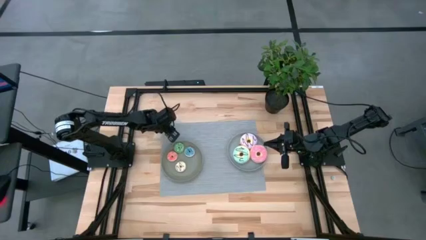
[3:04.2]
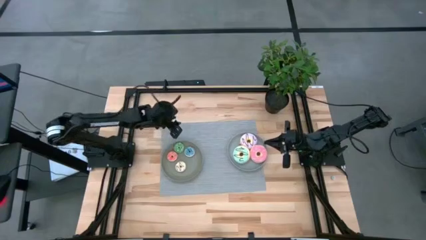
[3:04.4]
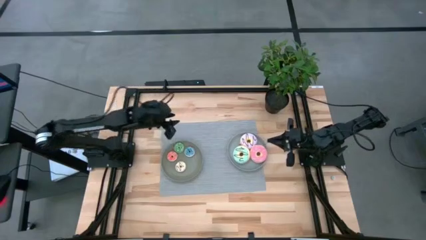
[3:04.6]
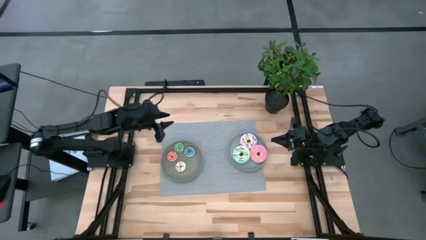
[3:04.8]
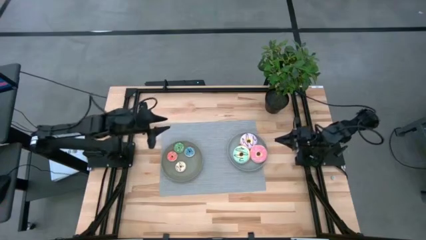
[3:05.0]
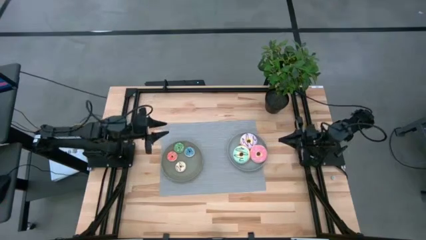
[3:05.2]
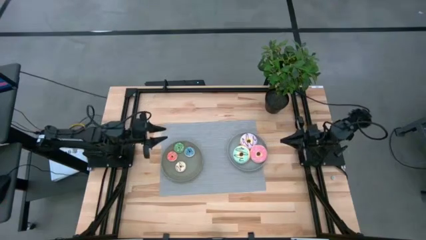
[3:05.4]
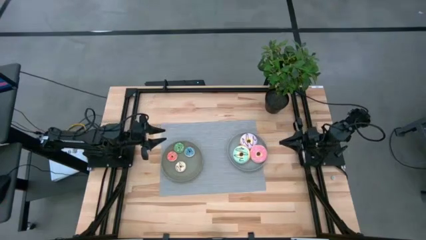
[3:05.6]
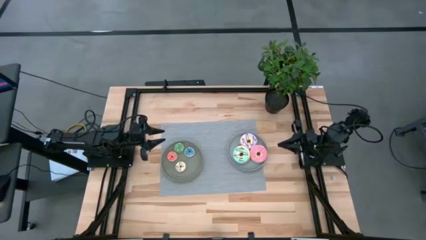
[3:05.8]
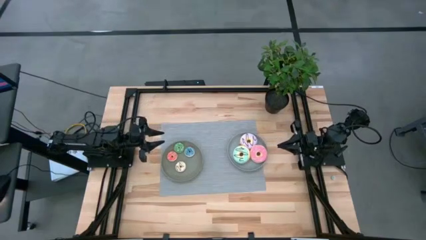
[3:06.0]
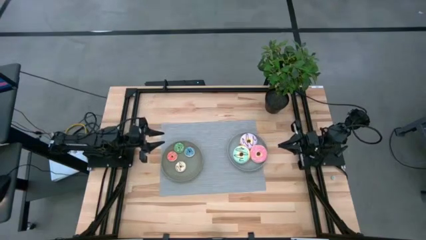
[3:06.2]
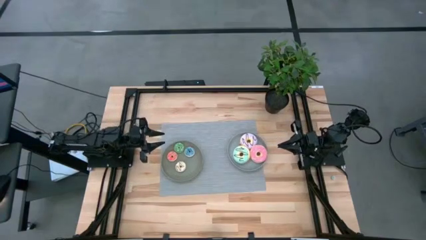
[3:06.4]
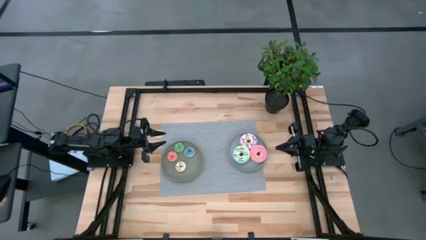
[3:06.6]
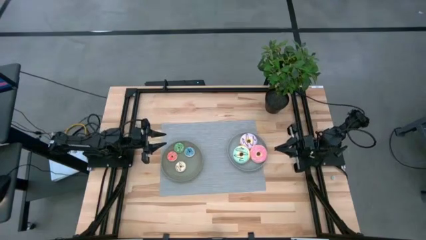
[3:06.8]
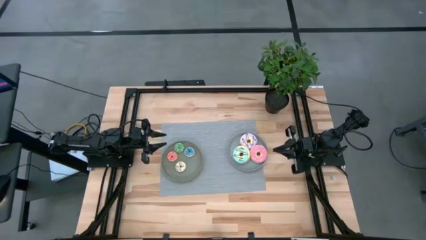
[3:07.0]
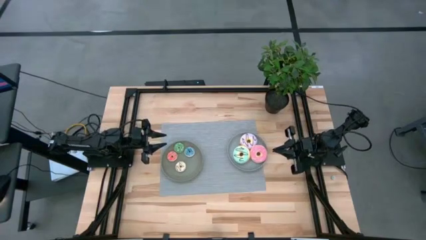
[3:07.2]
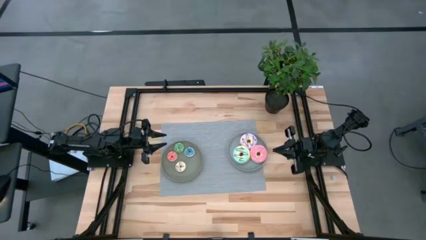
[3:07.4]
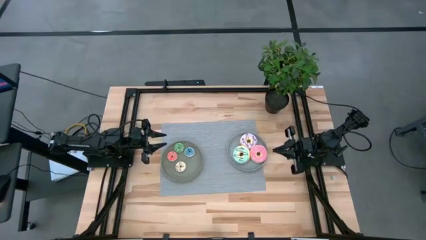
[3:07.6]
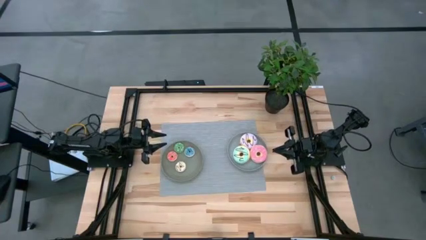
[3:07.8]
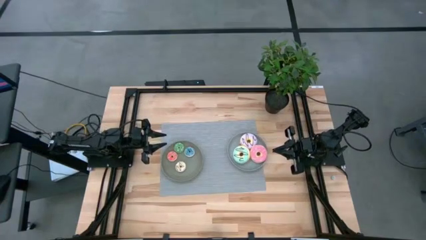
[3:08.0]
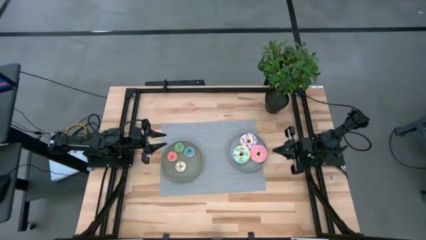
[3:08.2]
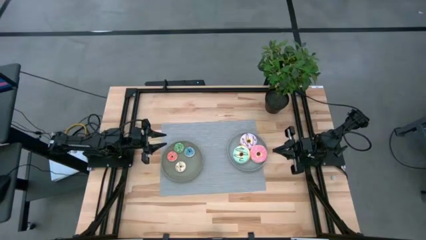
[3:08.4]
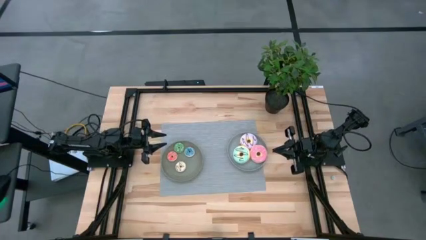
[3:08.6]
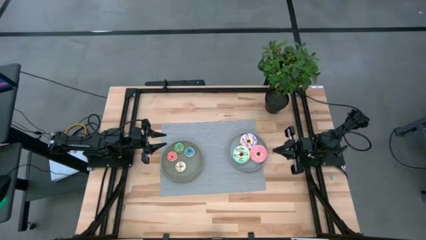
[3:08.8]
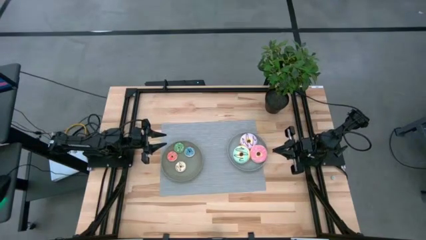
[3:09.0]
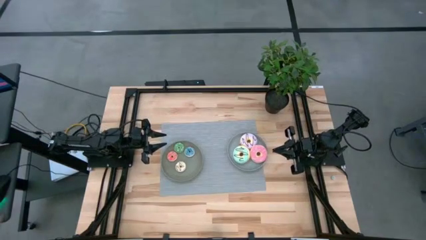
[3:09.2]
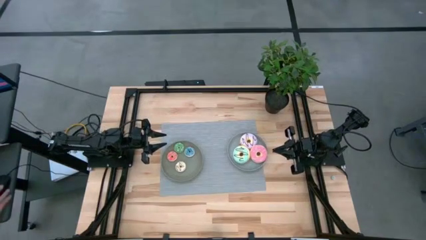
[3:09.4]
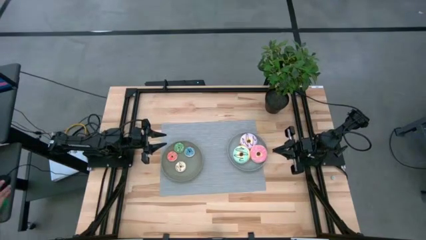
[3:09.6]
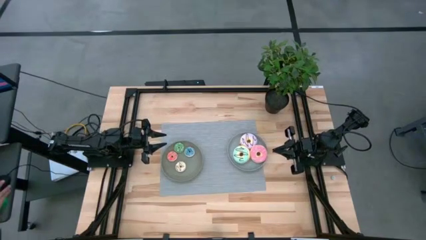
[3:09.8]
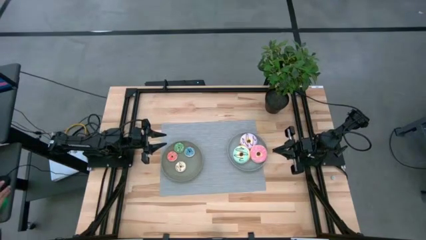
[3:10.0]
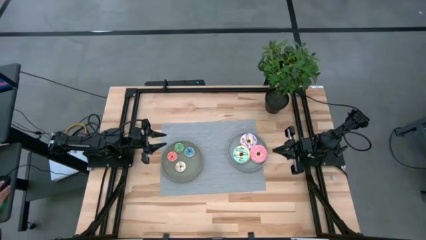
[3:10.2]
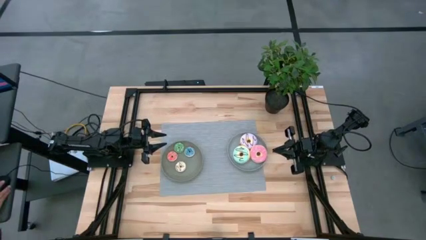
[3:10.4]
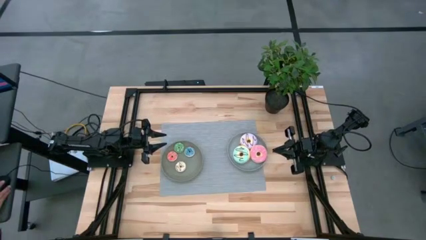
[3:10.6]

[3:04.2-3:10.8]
Task: Pick & Place donuts
Return to Home Position

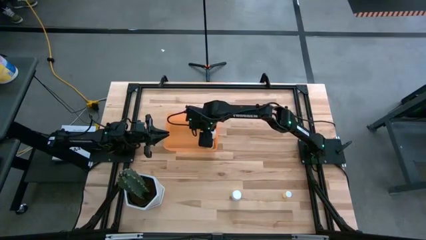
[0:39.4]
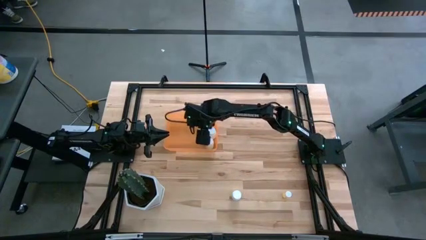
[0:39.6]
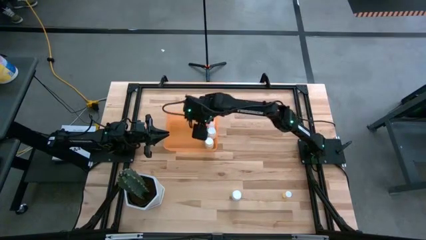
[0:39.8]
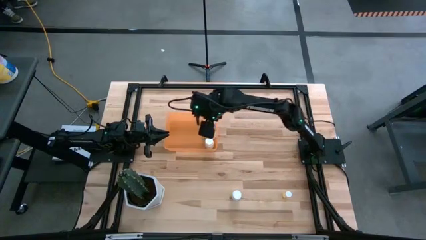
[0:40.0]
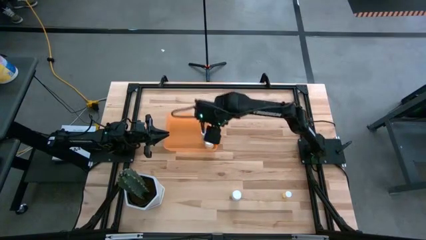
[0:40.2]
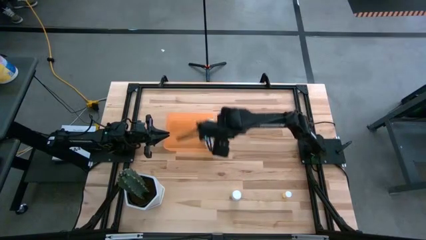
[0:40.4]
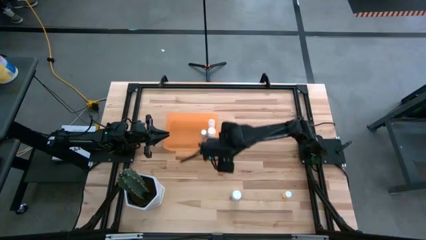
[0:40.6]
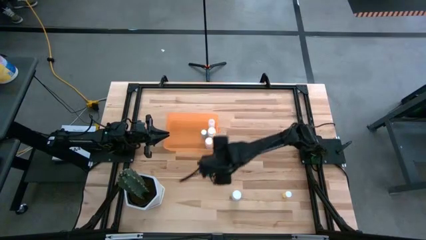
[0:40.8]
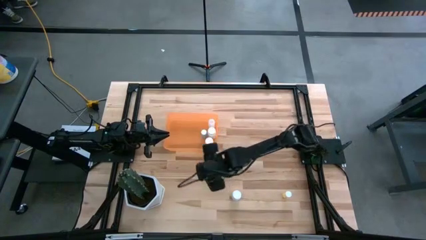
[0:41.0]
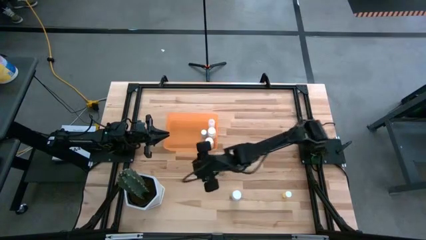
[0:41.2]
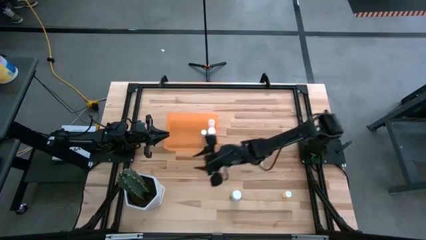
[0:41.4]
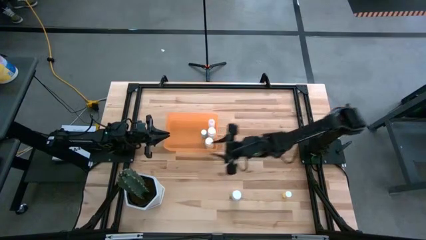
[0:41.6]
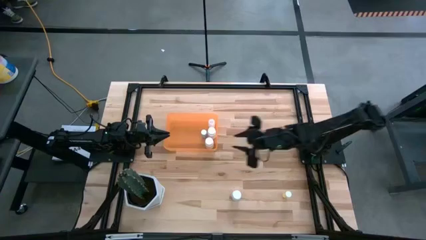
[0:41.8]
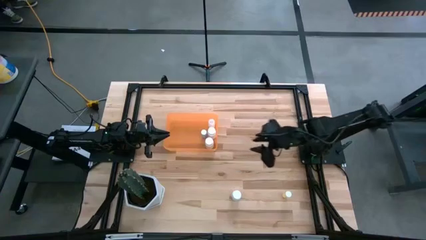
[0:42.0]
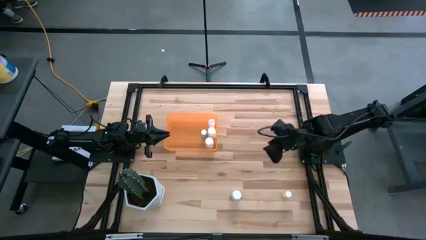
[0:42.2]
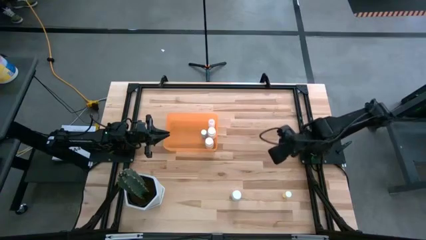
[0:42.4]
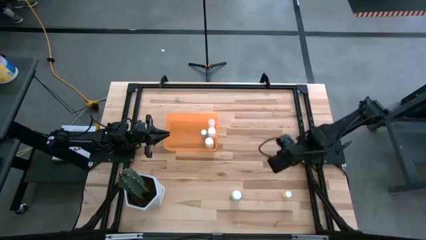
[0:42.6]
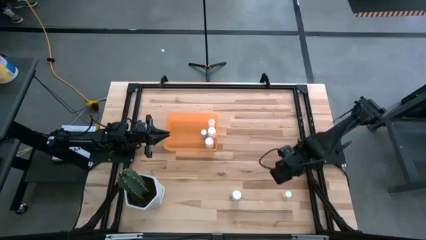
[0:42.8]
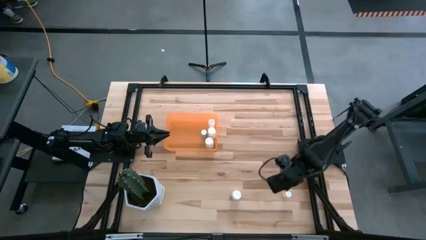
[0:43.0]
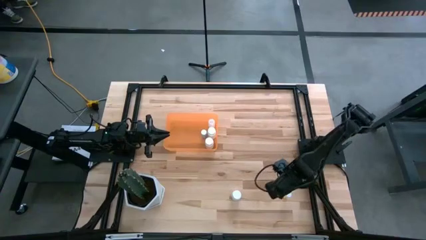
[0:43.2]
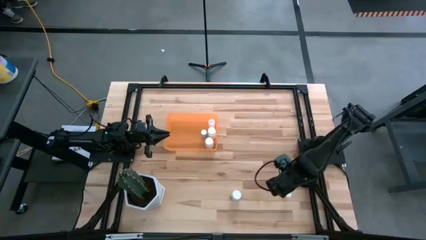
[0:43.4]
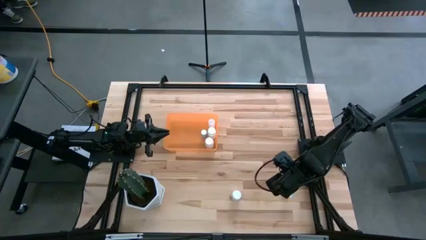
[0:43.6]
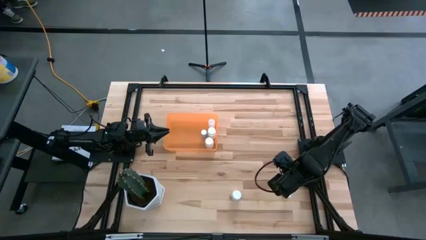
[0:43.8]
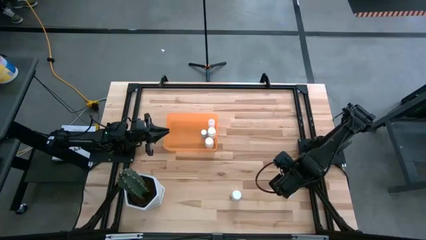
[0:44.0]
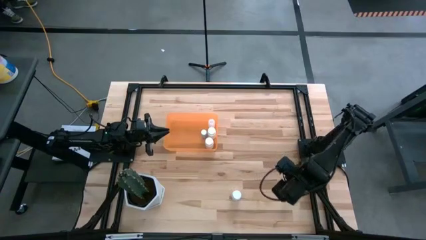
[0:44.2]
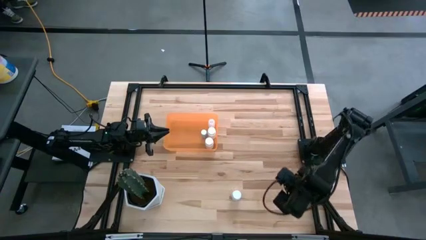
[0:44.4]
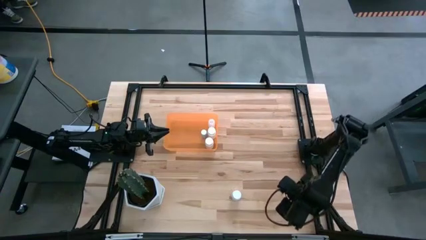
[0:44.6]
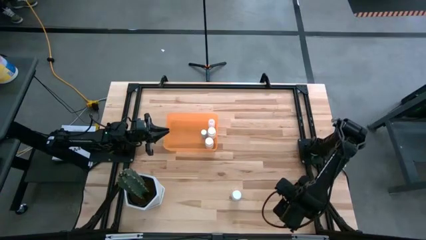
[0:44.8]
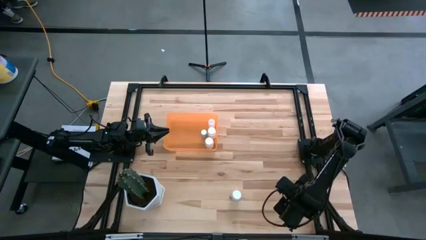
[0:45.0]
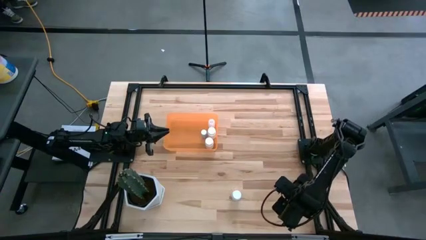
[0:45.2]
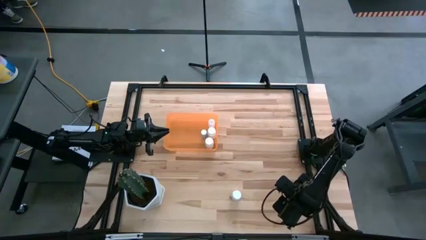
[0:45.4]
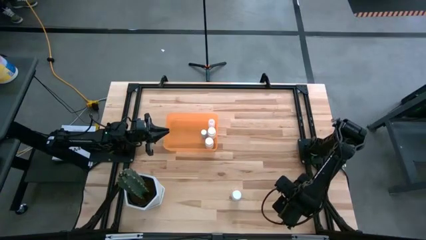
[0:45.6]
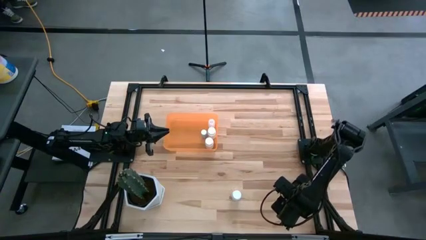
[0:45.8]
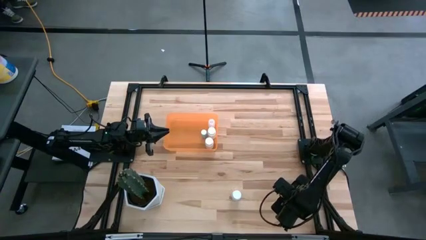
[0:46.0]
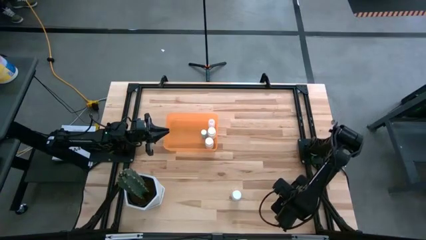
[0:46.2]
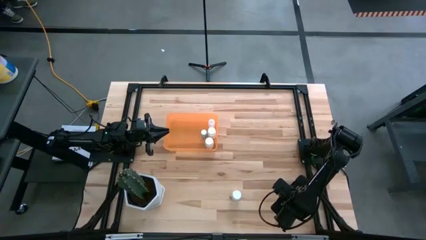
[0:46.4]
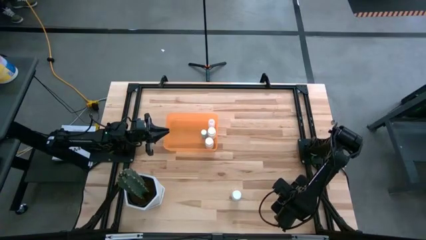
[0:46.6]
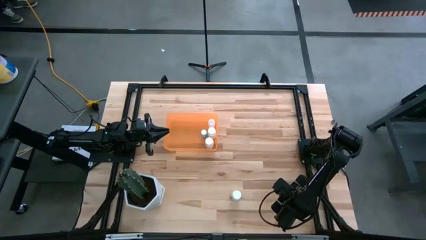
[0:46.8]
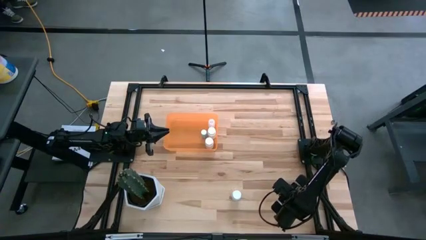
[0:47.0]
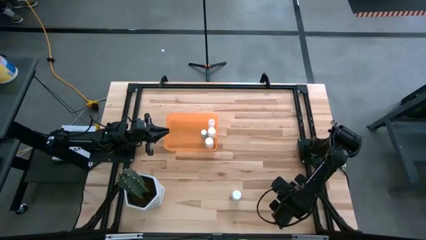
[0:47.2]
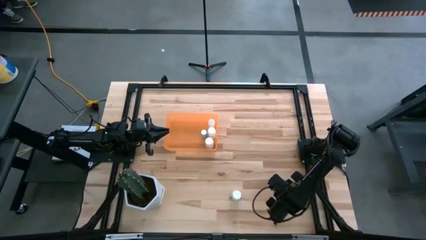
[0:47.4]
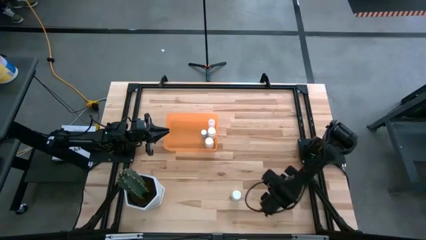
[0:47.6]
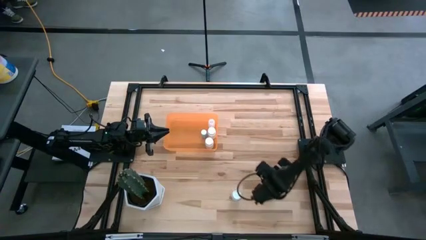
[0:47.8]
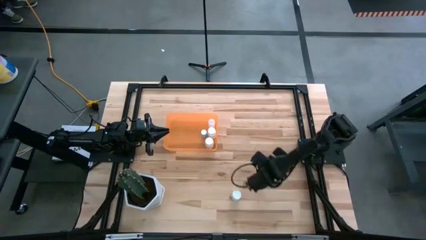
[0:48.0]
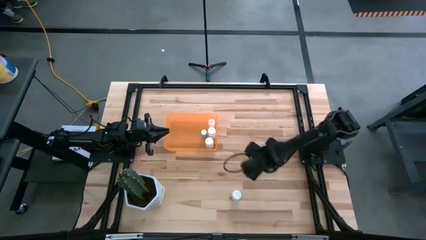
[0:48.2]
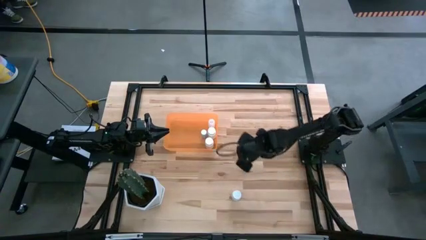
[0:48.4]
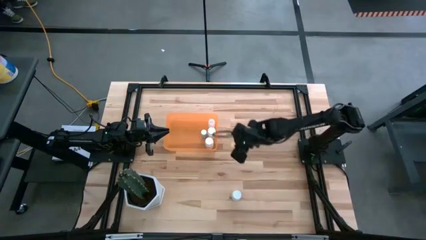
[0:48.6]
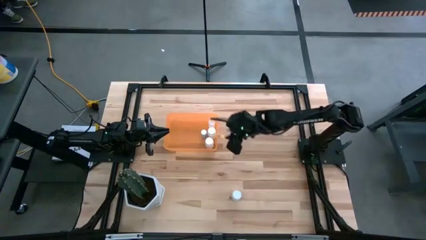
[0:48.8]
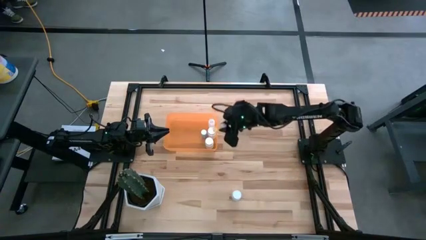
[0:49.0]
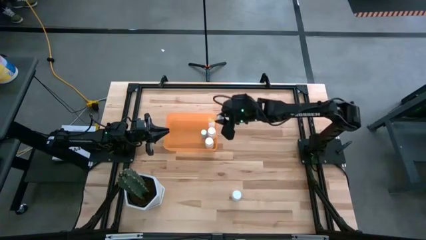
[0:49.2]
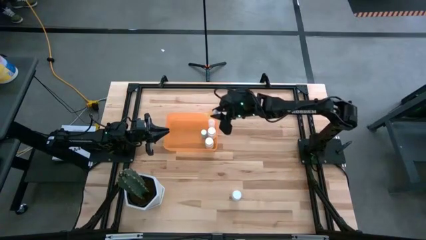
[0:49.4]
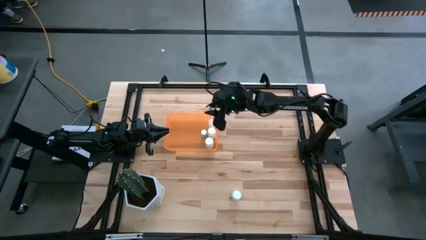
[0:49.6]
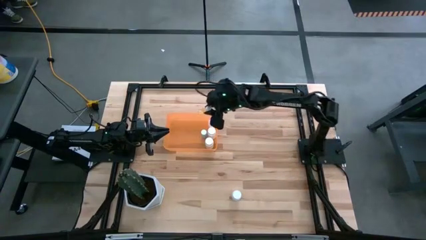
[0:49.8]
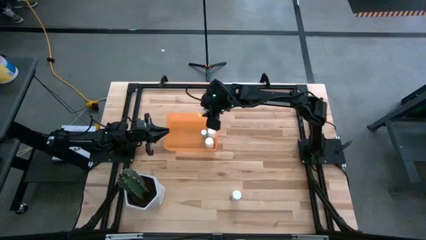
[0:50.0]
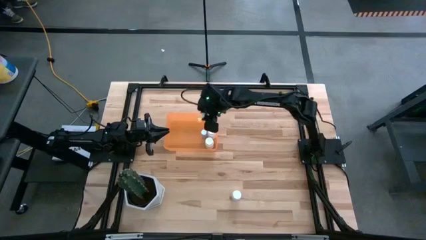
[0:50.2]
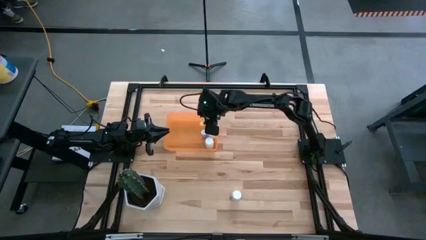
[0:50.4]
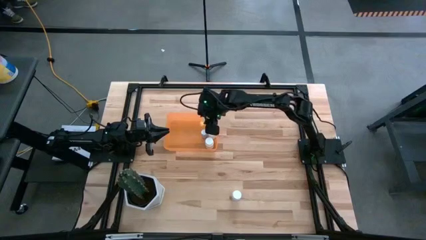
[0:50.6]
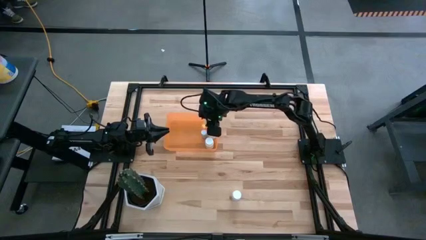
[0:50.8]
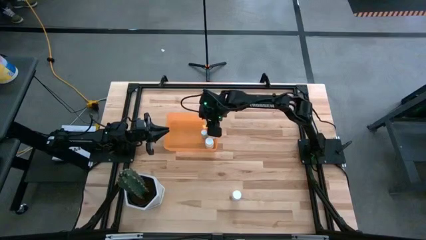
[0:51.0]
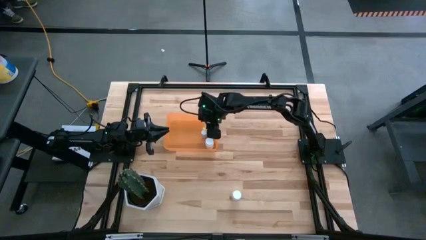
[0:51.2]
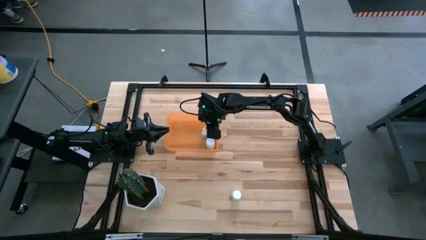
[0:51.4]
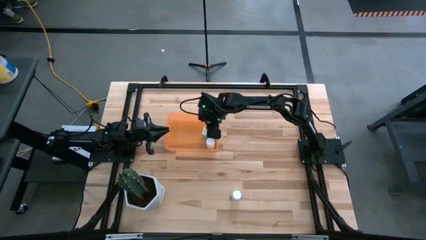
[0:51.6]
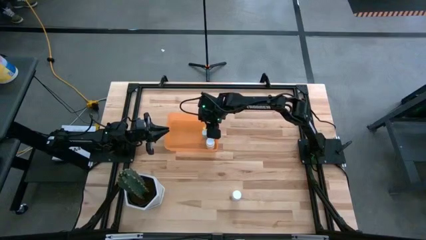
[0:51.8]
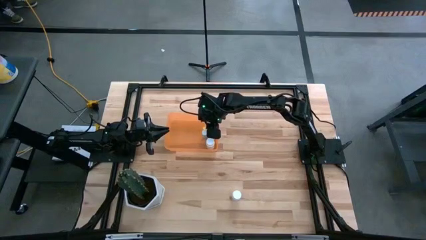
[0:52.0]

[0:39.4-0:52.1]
Task: Pick and place pill bottles into a basket
Put the yellow pill bottle in the orange bin
